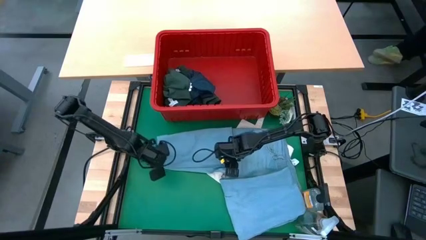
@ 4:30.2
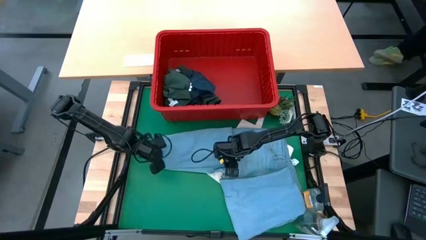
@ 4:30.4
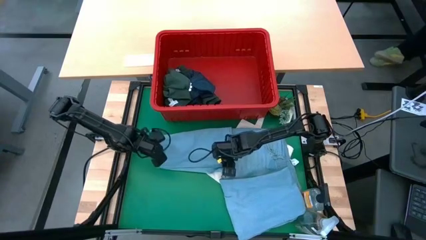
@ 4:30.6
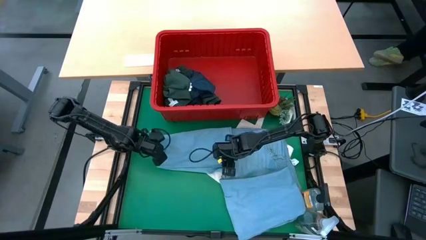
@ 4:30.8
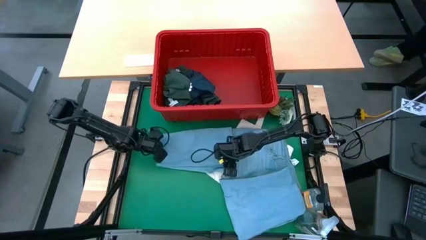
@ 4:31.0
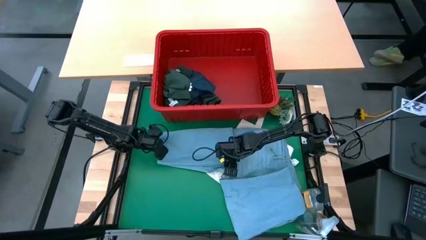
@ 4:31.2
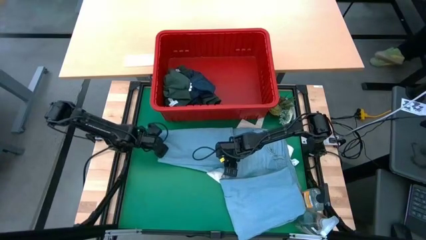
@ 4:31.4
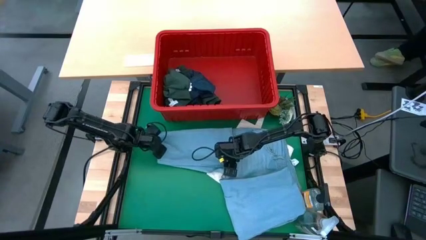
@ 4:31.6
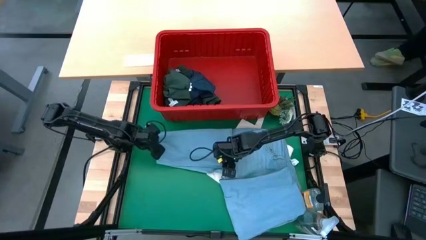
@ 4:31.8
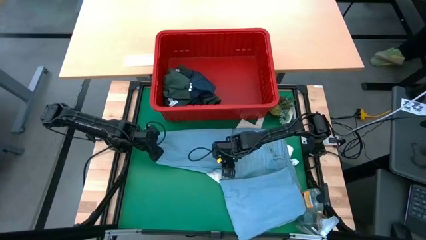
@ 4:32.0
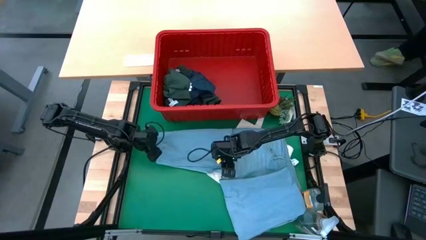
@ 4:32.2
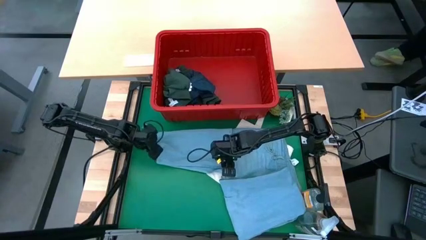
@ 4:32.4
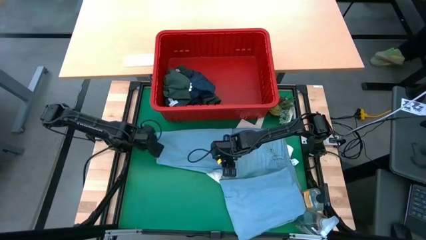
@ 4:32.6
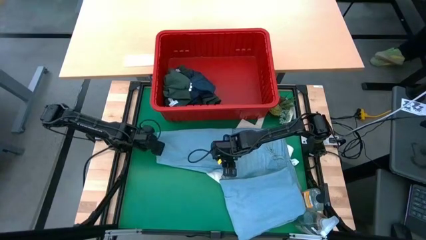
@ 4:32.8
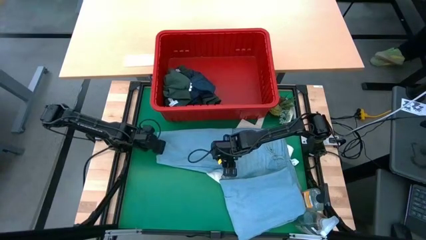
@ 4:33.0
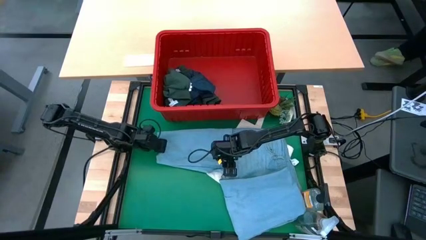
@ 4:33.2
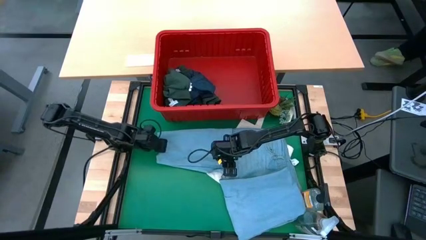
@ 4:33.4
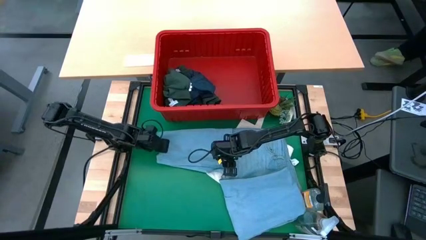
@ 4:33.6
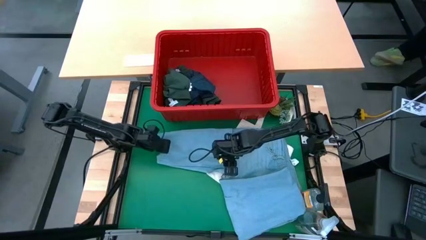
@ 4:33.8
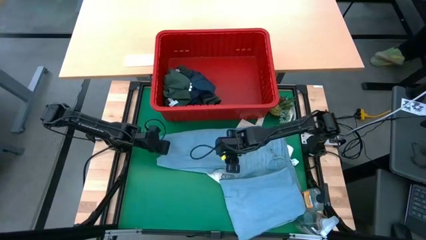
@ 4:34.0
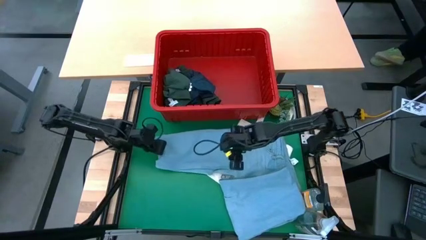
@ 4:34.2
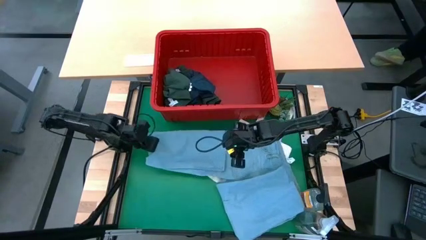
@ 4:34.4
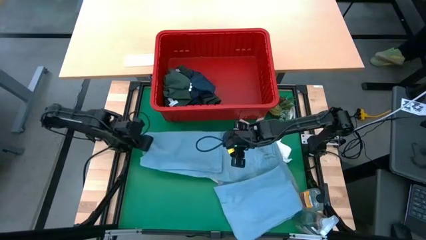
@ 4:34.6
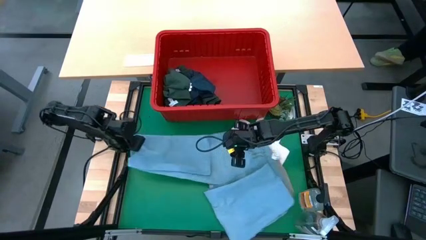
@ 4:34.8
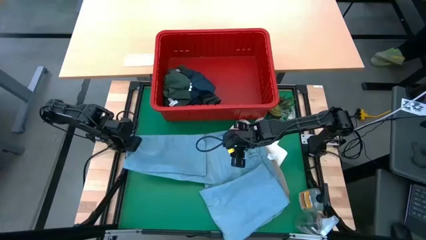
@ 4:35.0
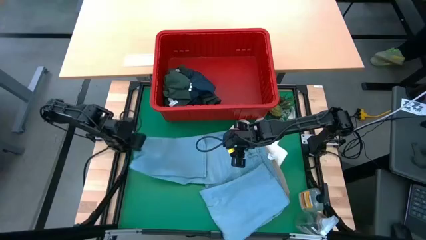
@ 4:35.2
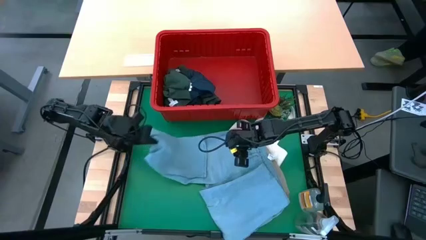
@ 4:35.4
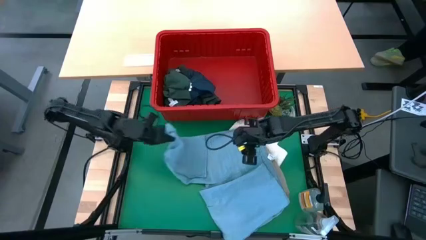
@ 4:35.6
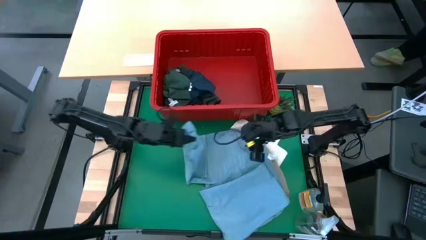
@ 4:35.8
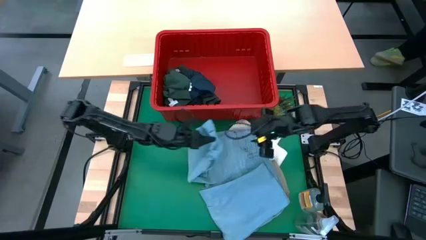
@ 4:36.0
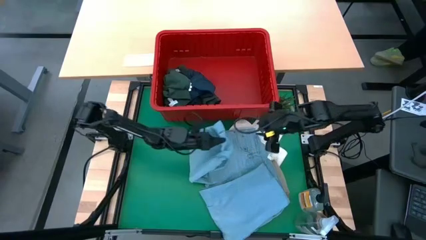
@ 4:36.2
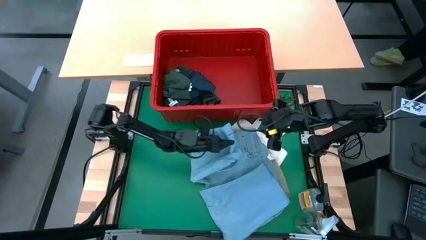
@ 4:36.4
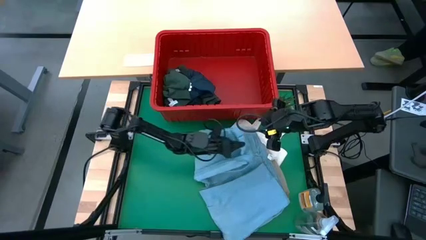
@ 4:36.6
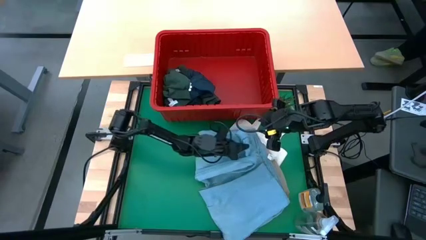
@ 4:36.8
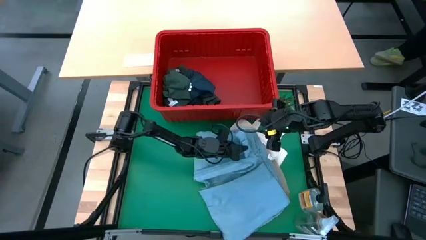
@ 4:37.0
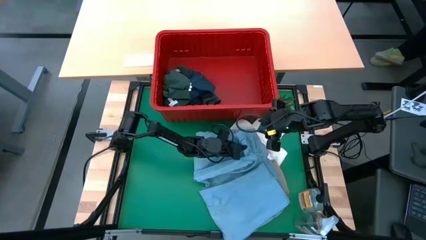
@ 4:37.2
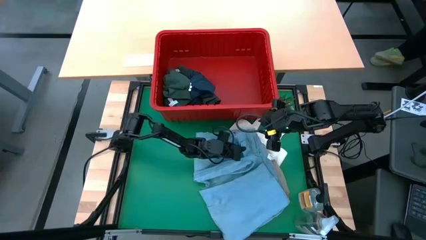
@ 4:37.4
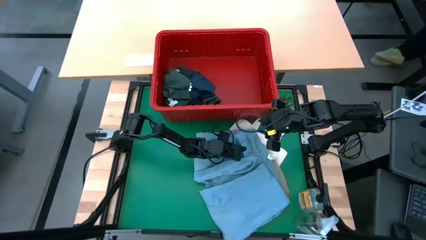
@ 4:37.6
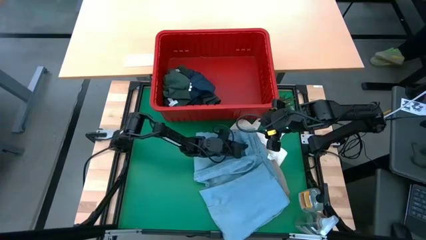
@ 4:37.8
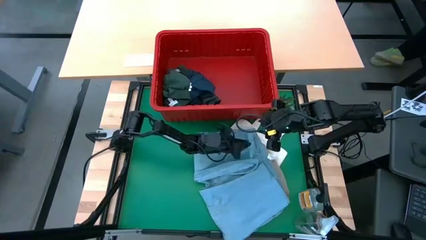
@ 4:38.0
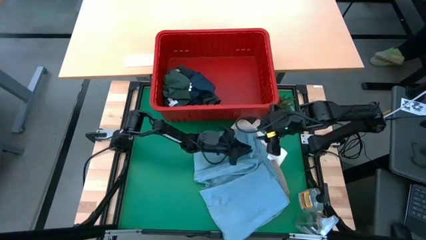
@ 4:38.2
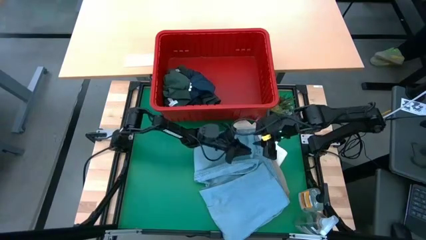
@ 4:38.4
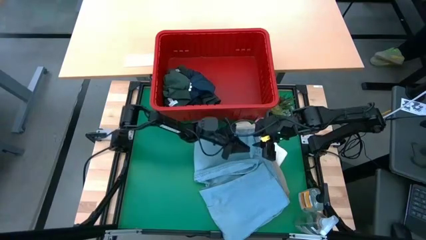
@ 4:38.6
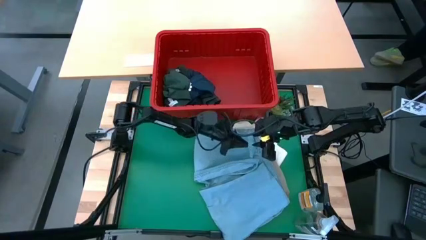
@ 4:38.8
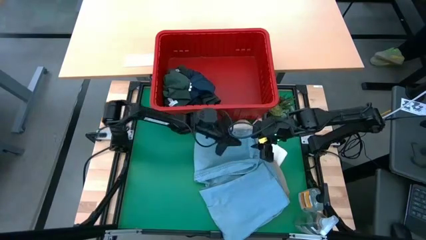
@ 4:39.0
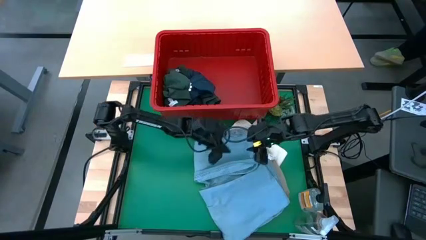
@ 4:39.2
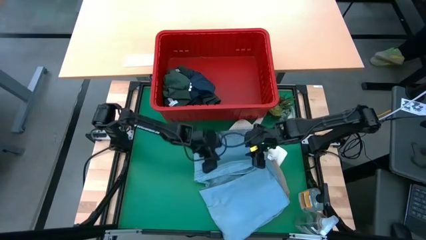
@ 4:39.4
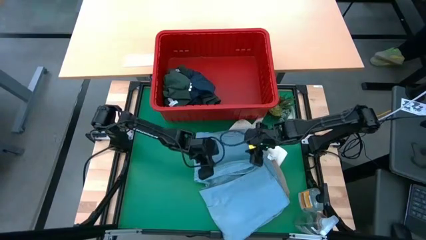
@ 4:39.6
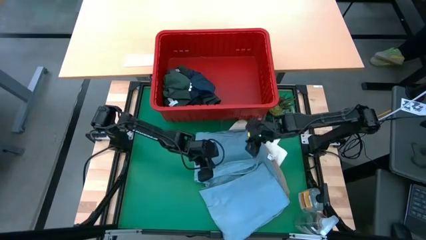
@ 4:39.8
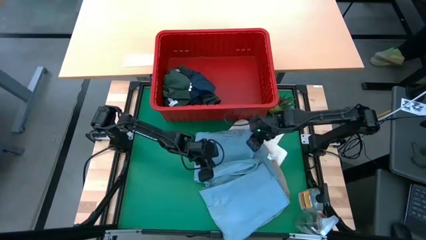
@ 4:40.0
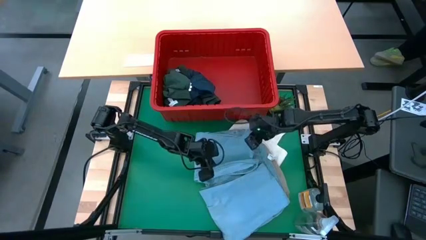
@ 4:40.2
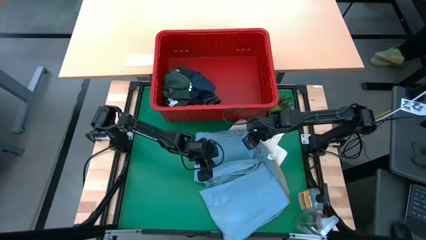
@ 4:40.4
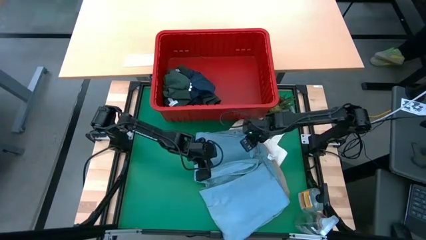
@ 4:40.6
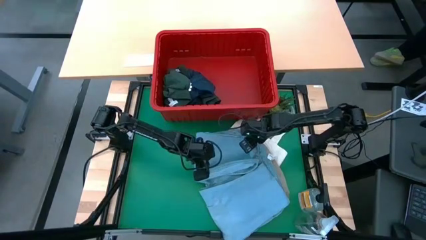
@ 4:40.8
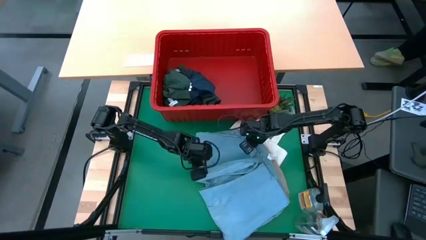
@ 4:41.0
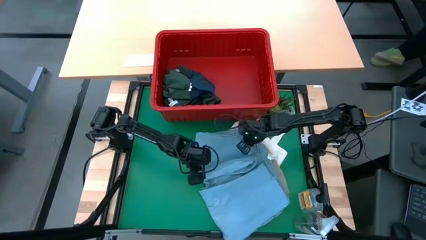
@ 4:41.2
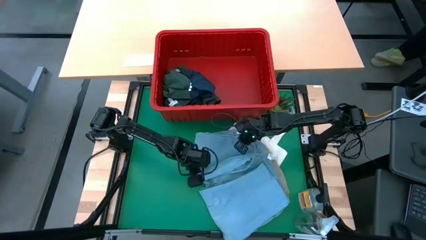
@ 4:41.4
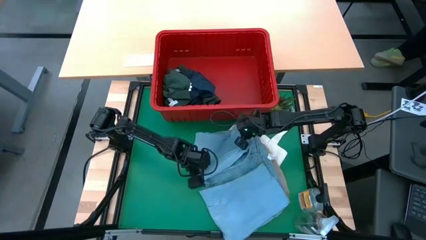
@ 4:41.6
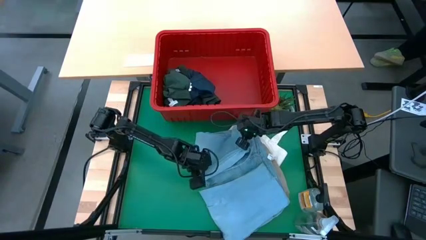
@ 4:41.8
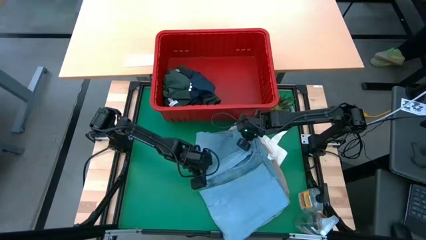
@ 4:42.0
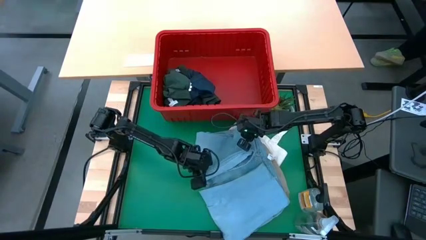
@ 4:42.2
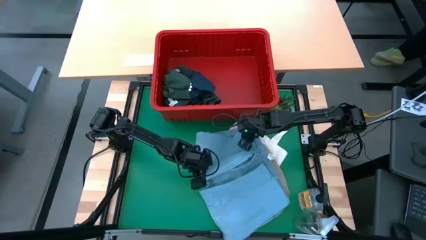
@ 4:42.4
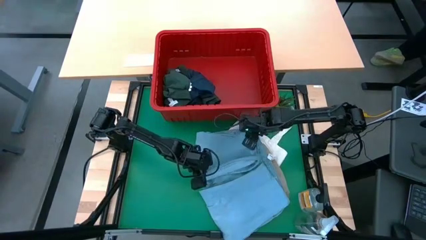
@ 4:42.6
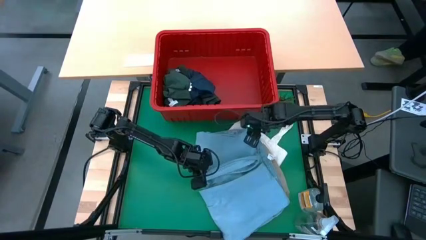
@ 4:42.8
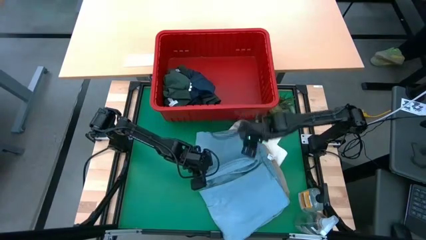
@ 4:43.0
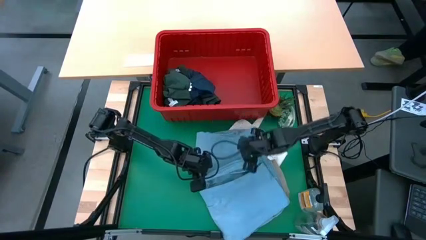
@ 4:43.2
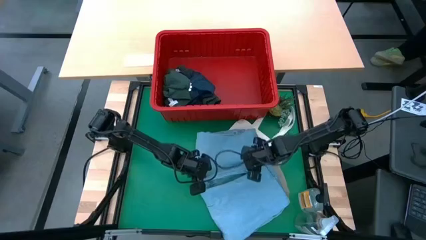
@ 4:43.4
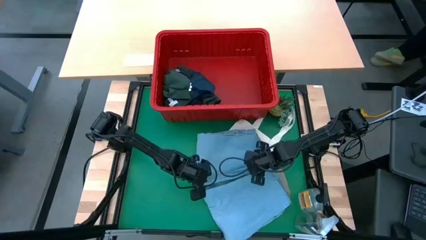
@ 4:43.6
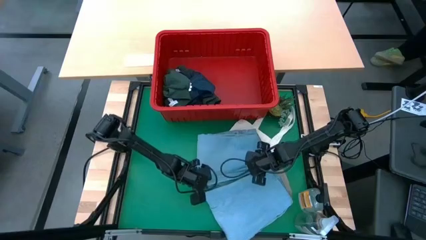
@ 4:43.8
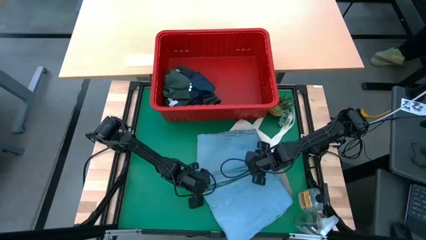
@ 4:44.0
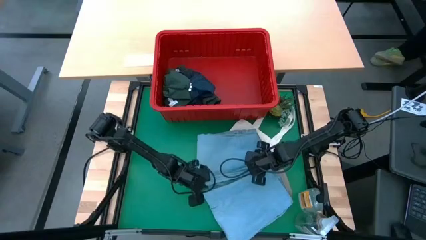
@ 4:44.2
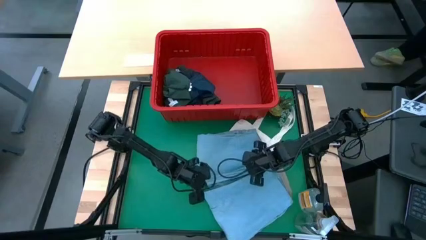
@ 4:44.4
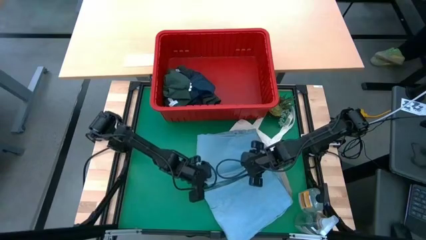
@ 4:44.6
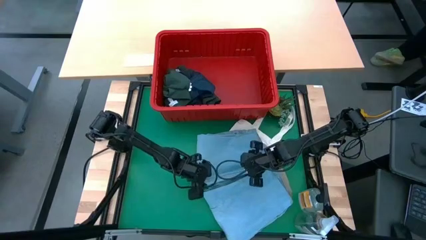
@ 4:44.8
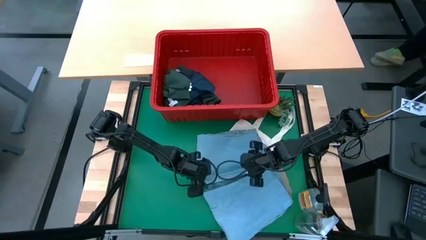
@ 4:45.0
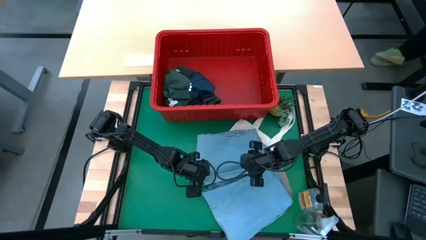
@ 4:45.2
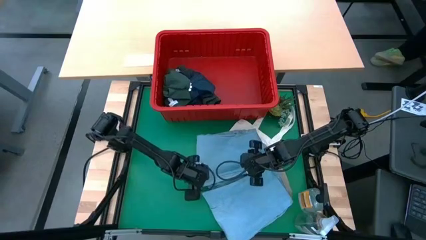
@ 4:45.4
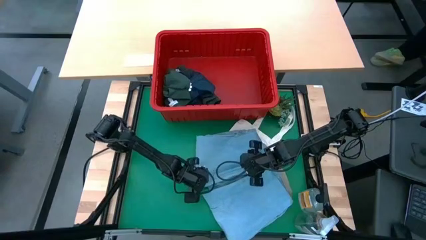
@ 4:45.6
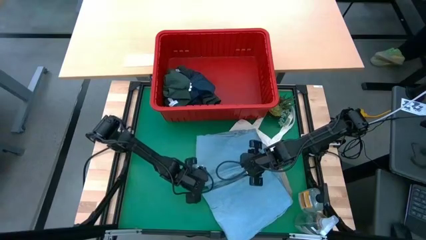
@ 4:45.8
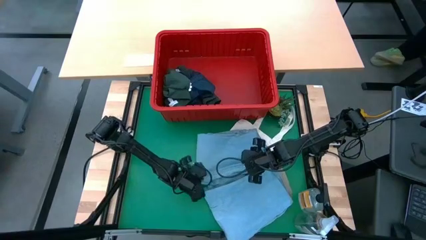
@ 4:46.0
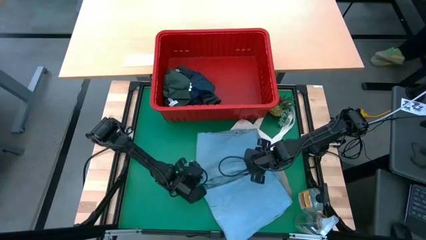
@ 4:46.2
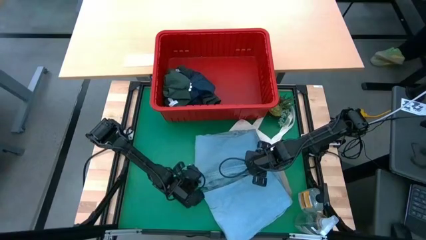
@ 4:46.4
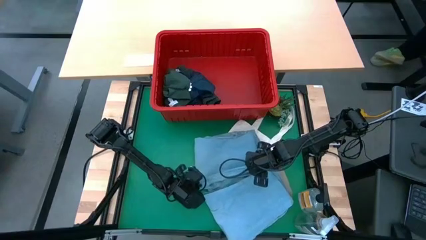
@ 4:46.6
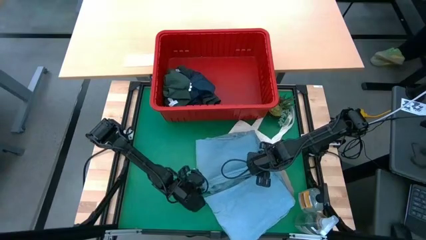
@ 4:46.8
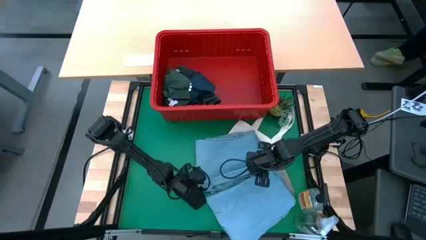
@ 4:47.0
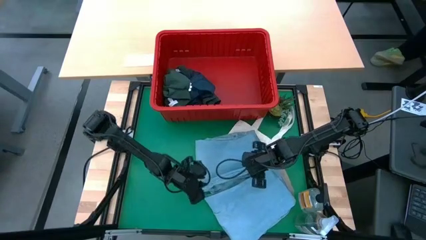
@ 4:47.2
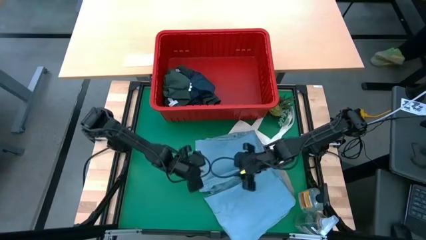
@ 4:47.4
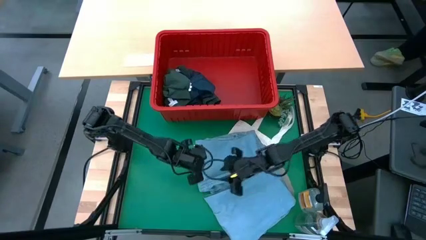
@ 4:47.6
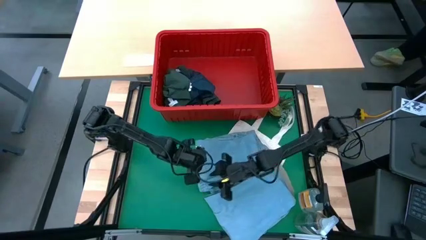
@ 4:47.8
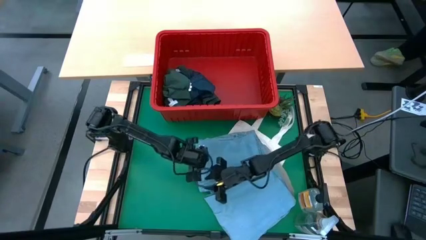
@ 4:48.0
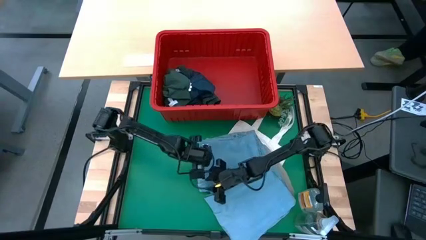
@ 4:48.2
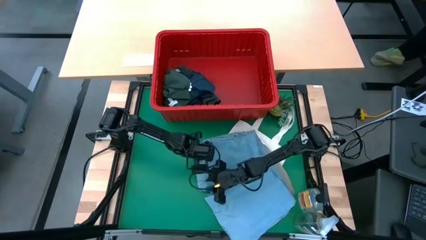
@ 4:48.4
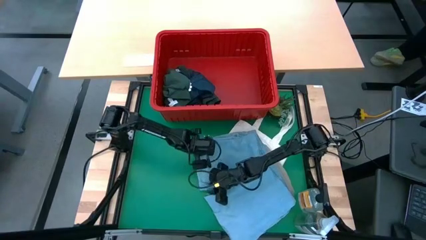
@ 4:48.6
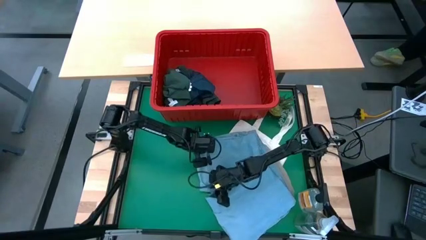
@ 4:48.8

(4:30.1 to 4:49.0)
Task: Fold Laundry from Bin
Fold the light blue jeans
